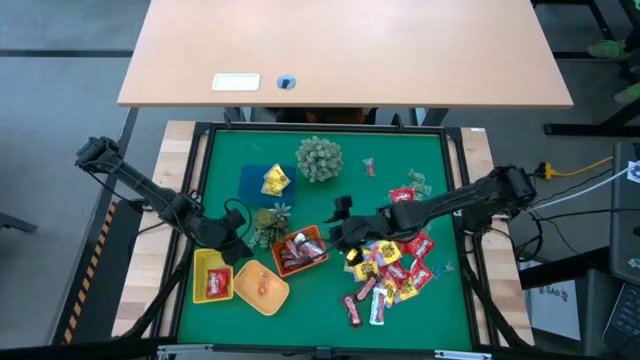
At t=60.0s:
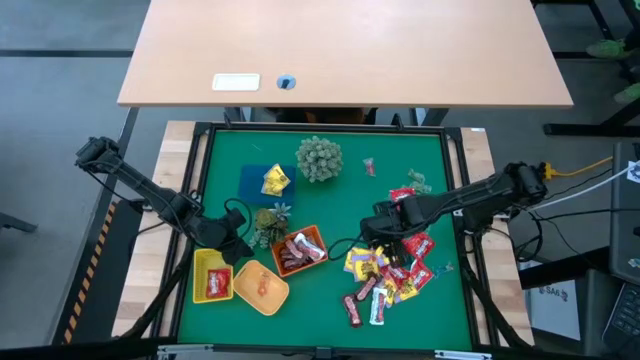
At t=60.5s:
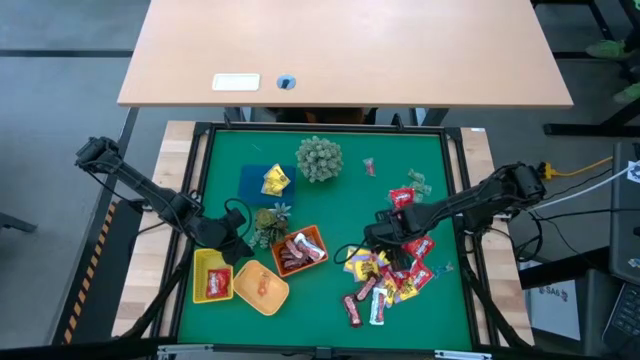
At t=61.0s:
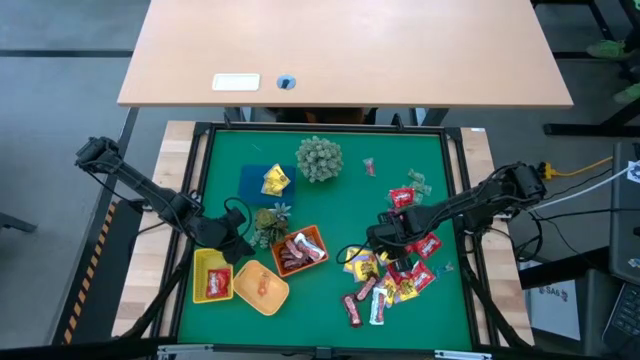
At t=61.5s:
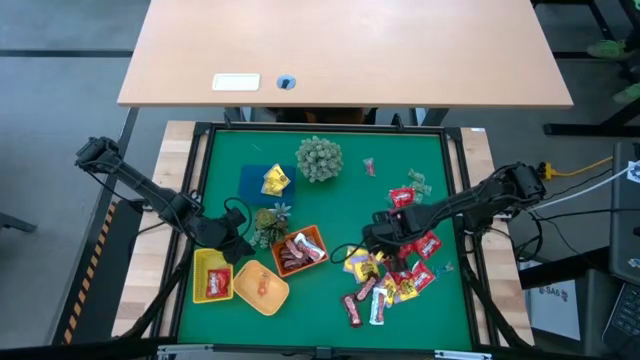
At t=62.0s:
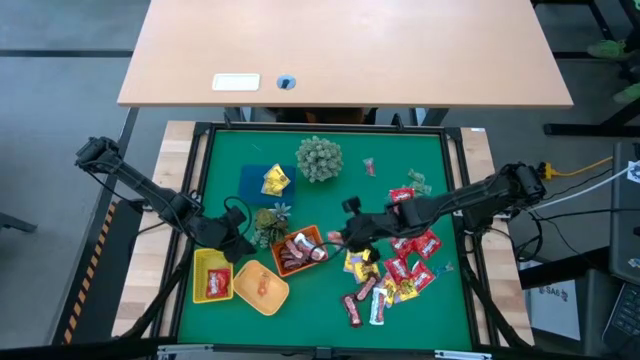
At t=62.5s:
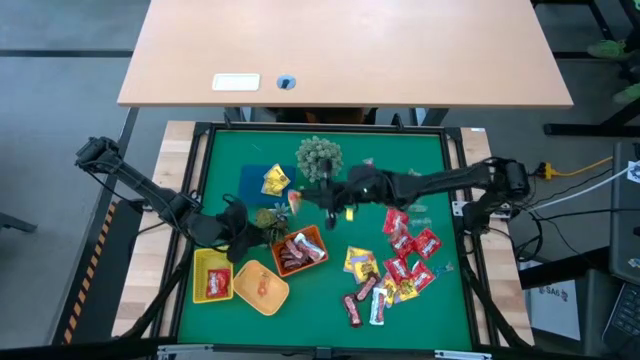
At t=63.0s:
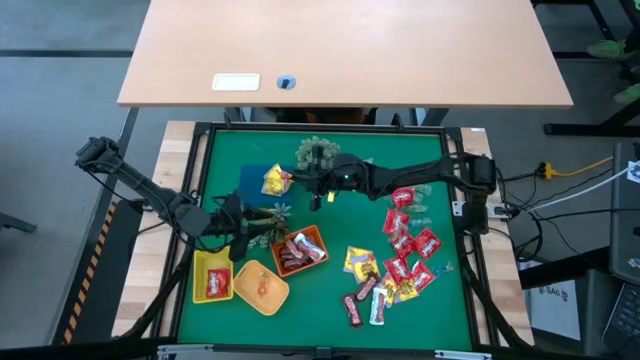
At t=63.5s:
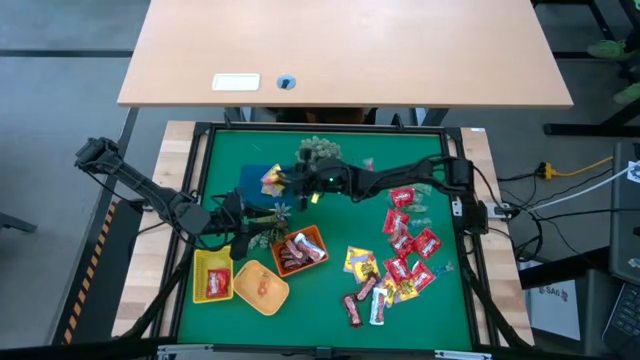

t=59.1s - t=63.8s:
Task: Sort candy
Put the yellow candy into the blue bin

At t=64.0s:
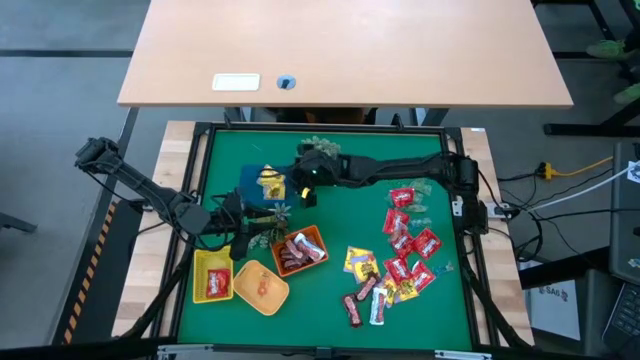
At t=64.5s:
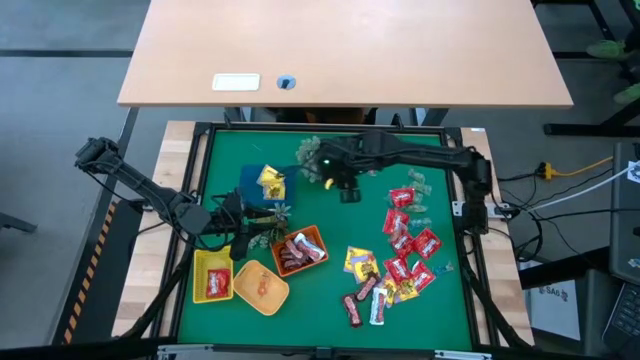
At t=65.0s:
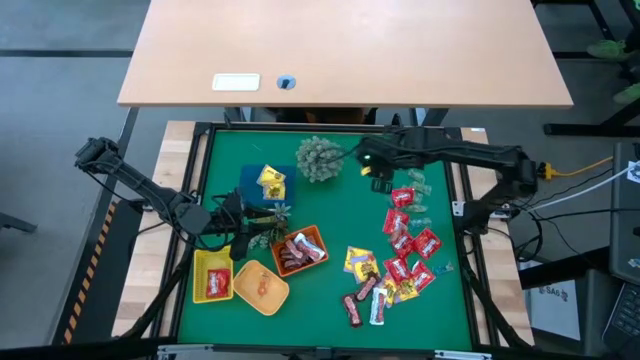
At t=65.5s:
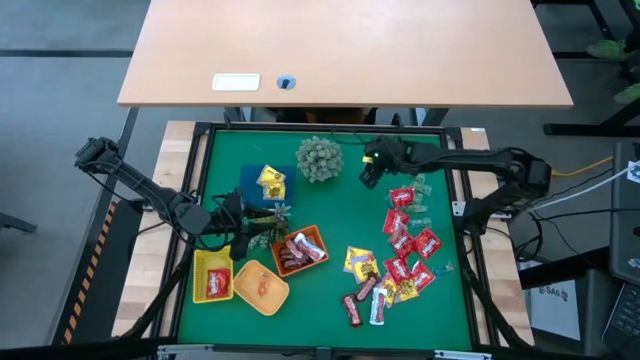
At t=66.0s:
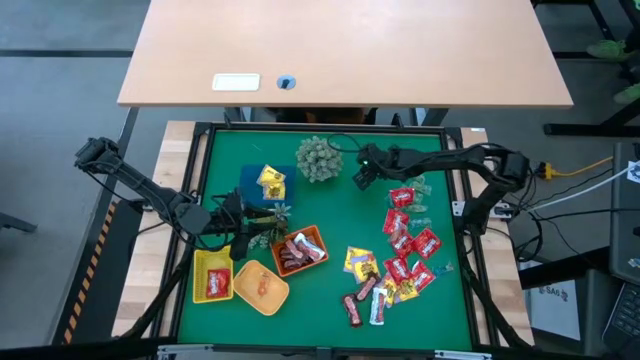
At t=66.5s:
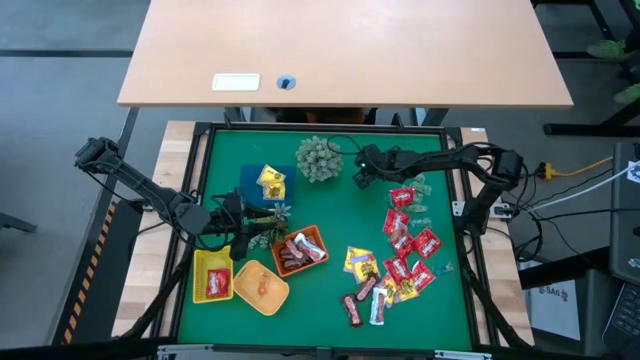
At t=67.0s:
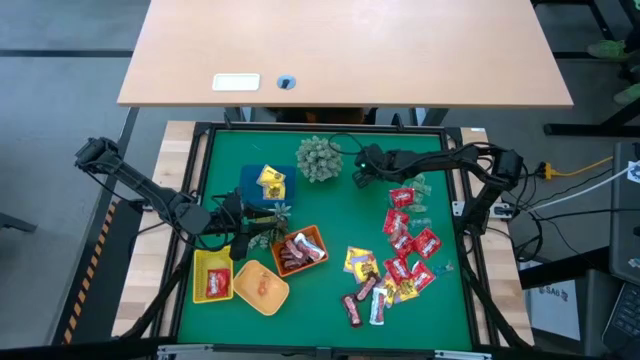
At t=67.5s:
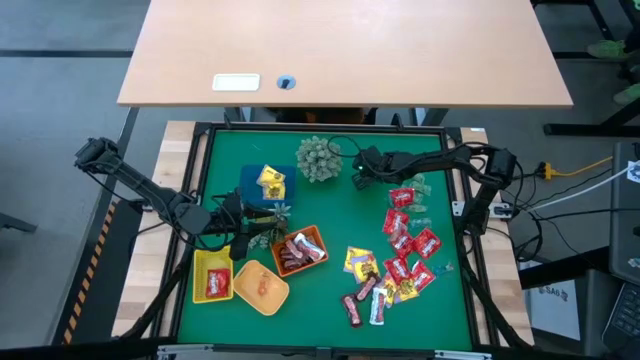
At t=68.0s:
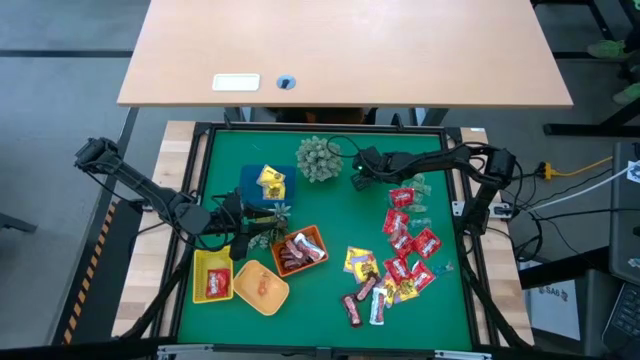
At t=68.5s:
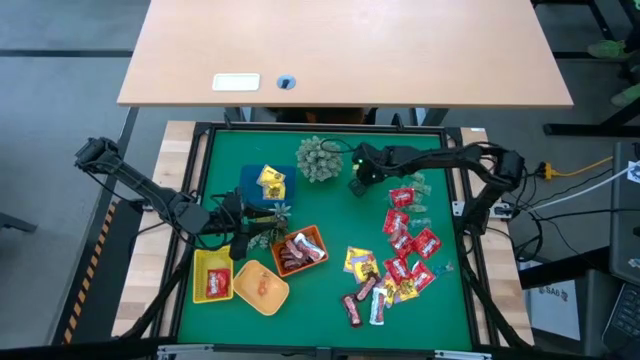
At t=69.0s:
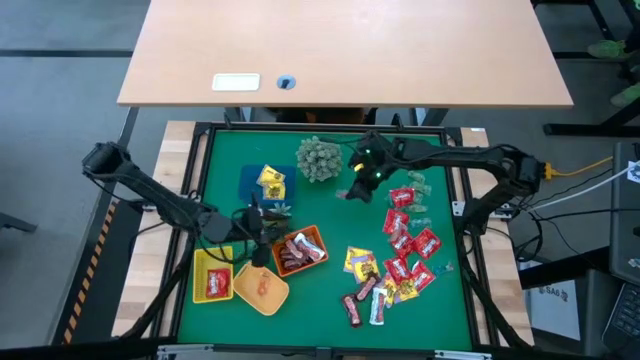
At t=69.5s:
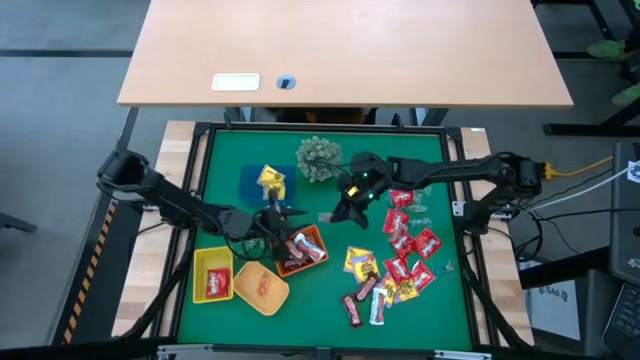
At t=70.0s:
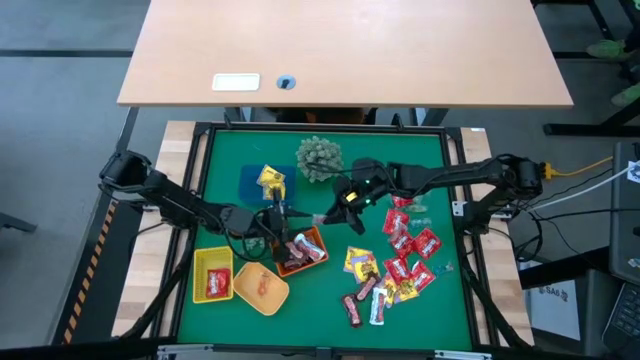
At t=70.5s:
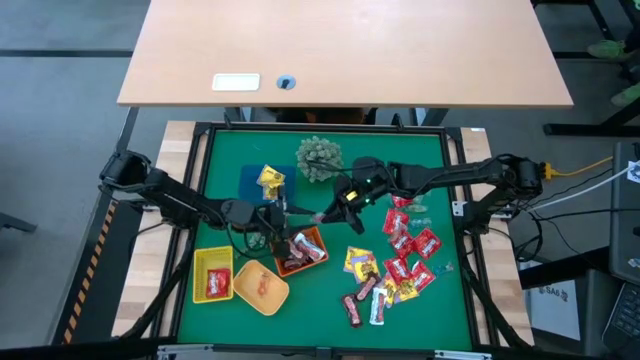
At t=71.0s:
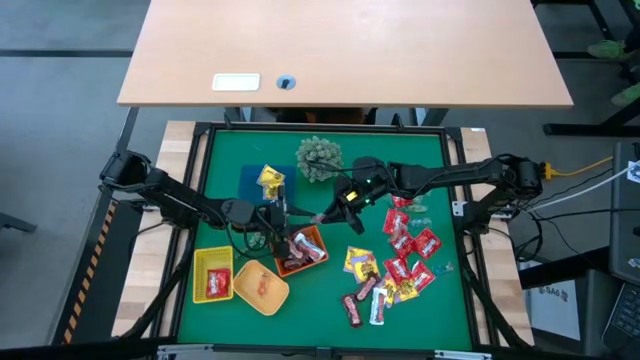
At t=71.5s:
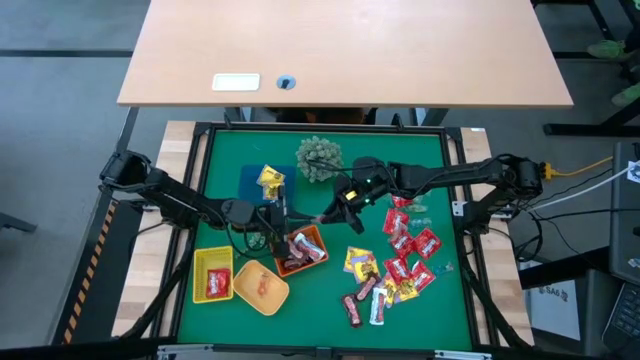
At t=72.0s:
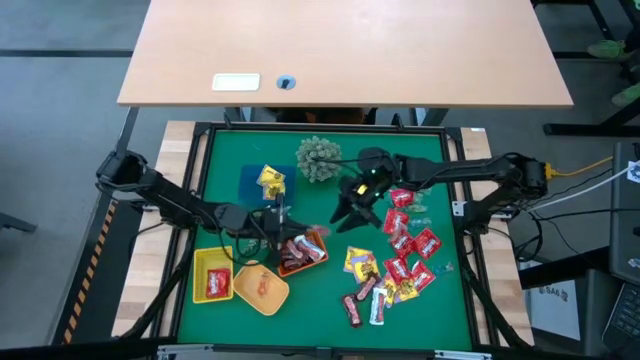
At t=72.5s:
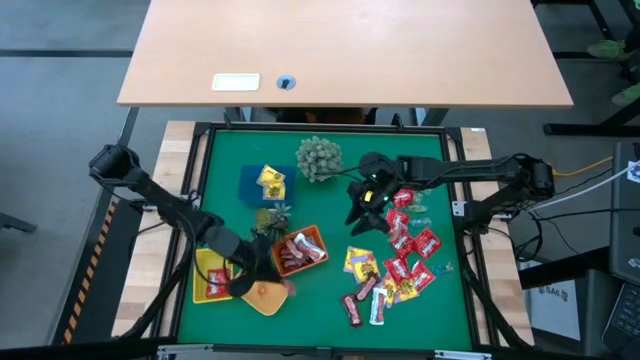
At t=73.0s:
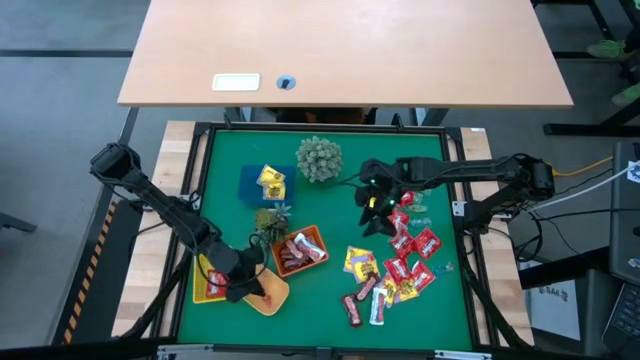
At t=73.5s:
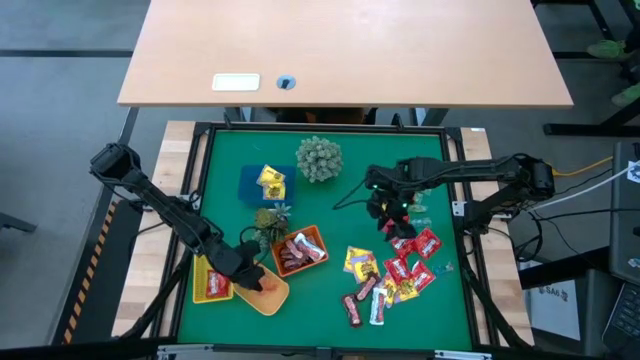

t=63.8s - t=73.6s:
Put the red gummy into the light orange bin

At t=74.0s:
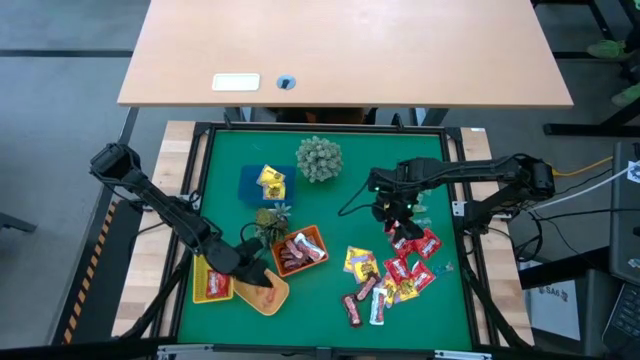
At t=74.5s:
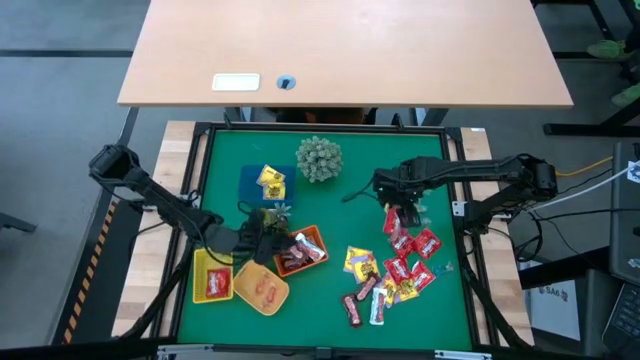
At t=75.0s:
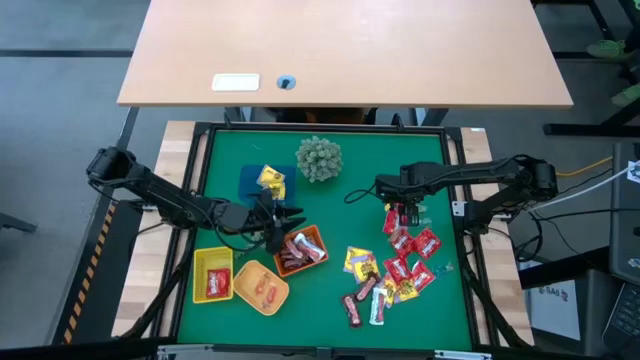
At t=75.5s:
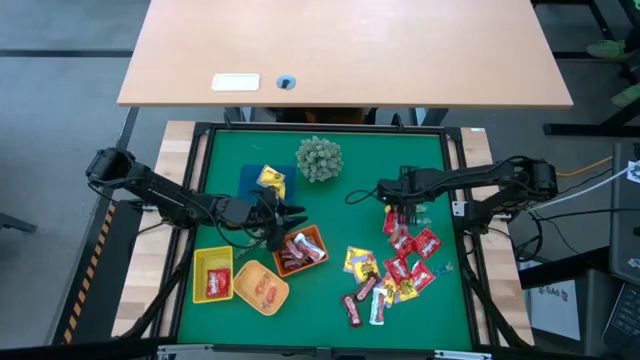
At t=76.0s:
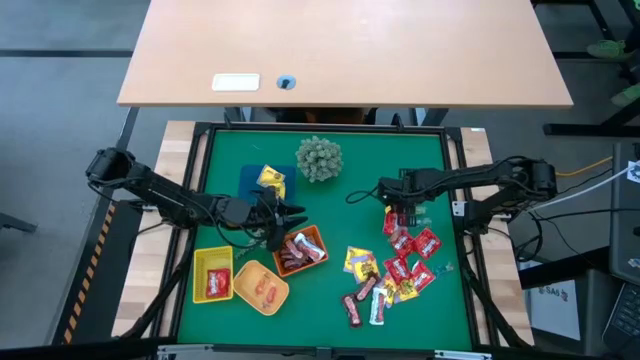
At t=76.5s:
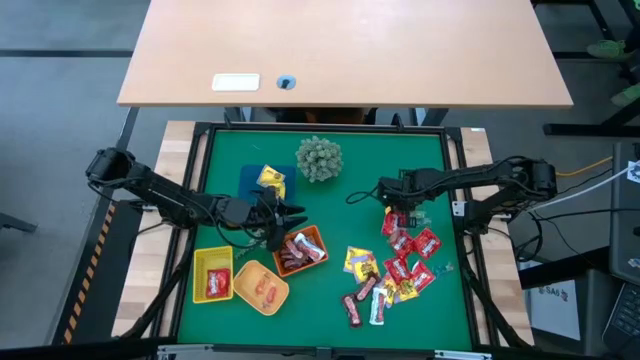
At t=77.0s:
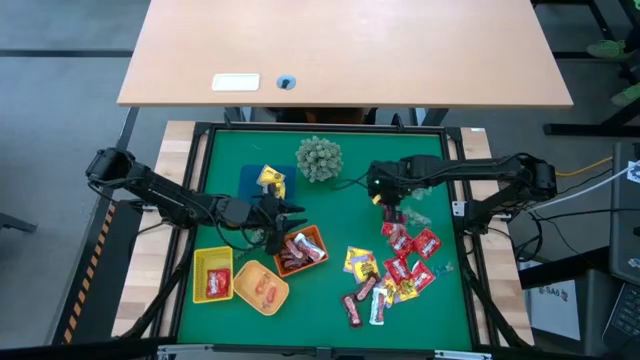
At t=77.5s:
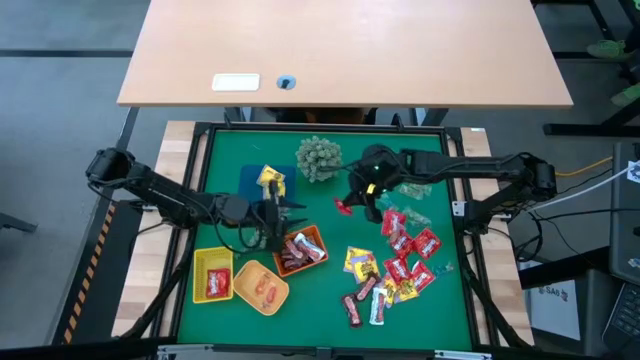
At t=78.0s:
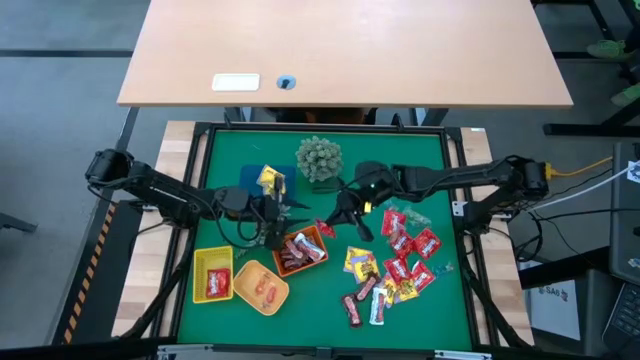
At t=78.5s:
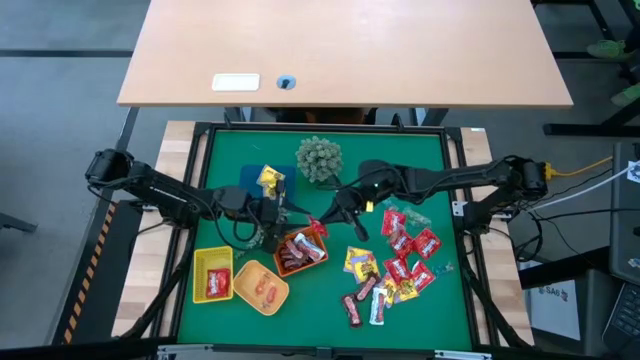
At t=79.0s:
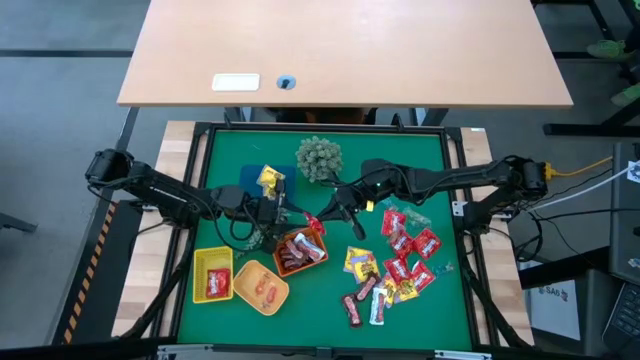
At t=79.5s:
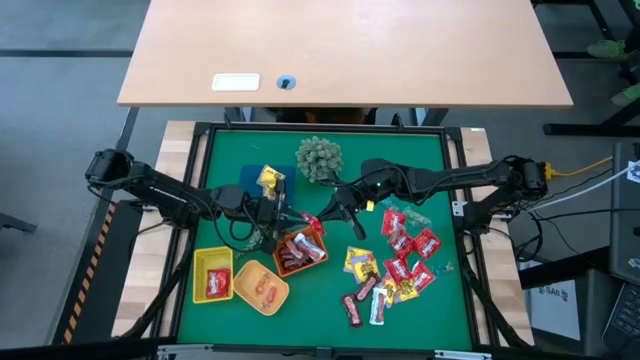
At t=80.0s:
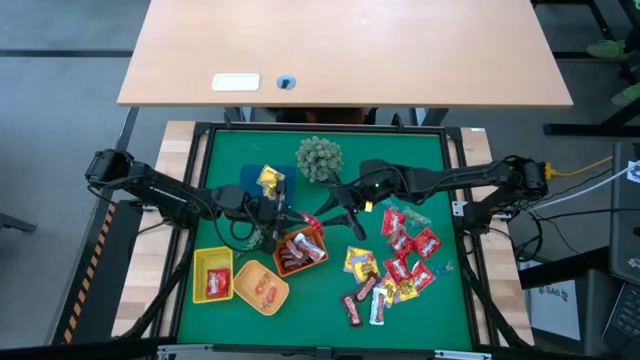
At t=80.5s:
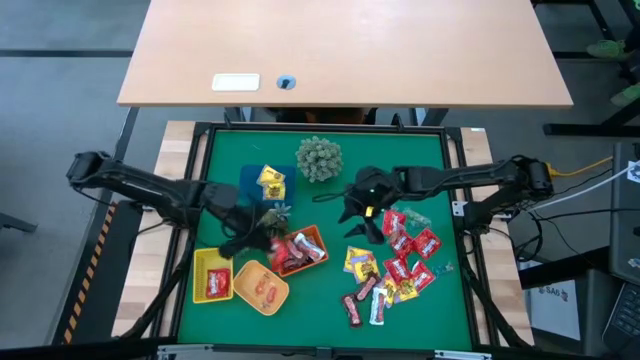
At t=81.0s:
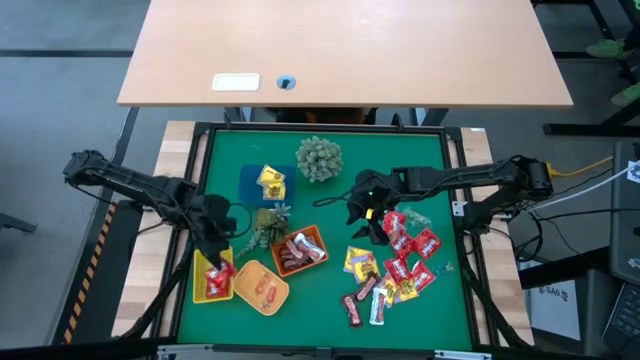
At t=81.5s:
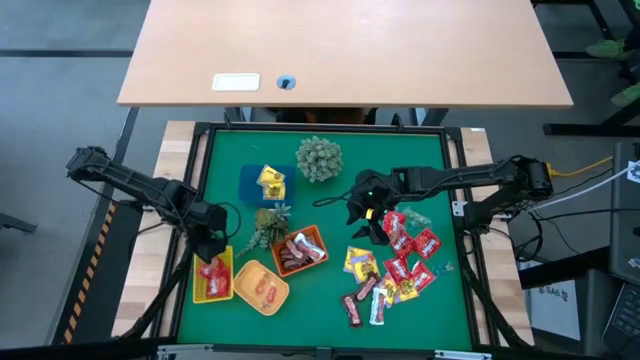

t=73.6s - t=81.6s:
Put the red candy into the yellow bin
